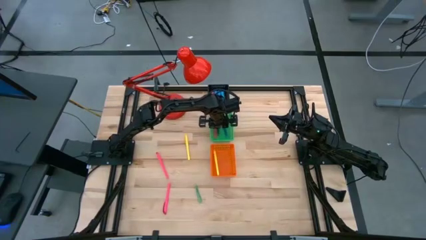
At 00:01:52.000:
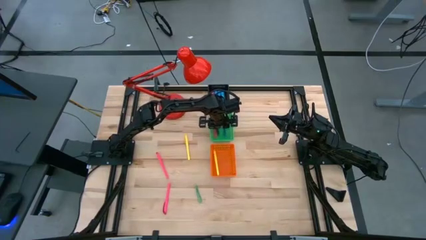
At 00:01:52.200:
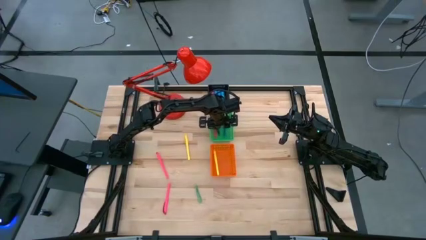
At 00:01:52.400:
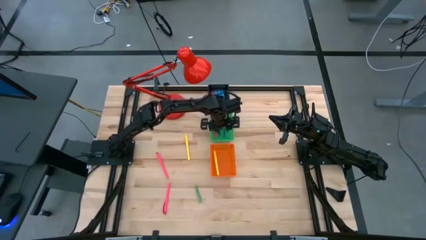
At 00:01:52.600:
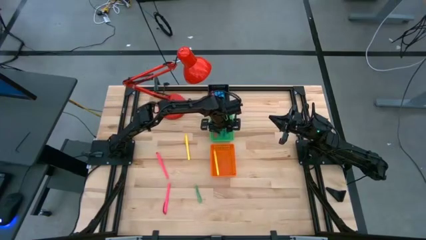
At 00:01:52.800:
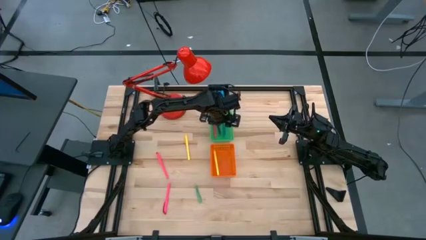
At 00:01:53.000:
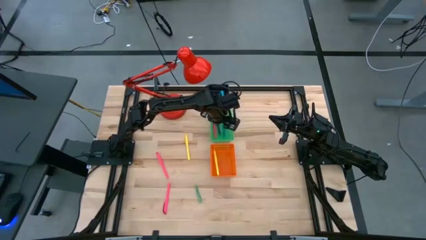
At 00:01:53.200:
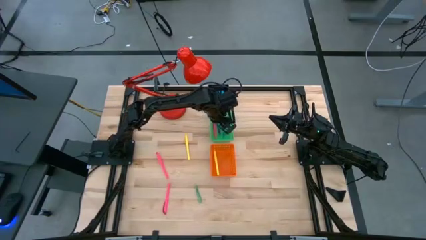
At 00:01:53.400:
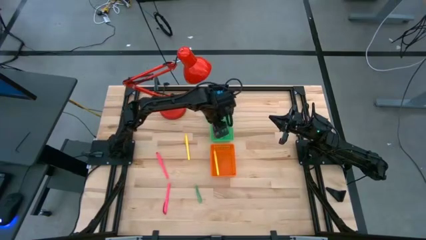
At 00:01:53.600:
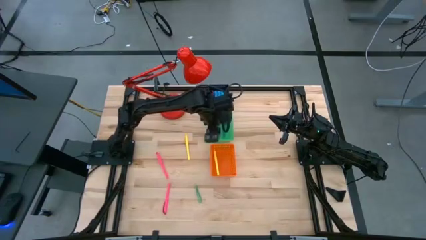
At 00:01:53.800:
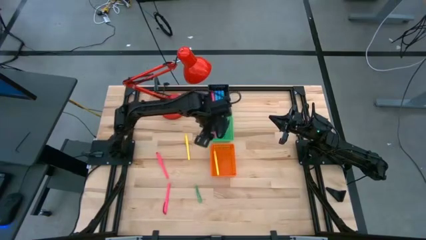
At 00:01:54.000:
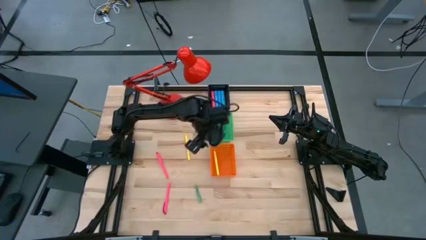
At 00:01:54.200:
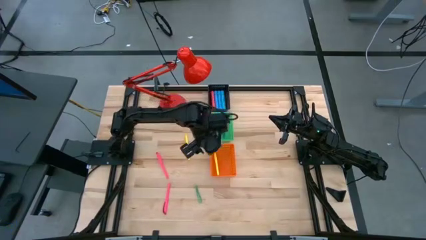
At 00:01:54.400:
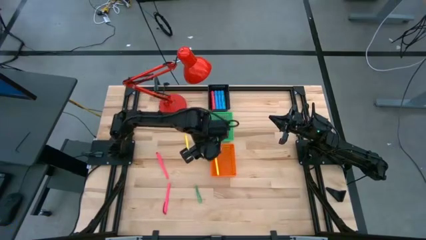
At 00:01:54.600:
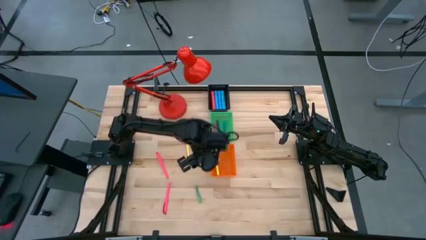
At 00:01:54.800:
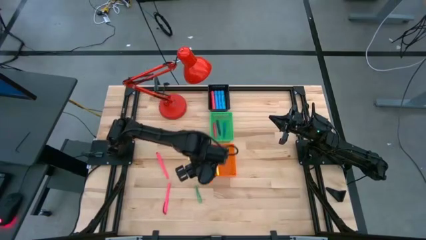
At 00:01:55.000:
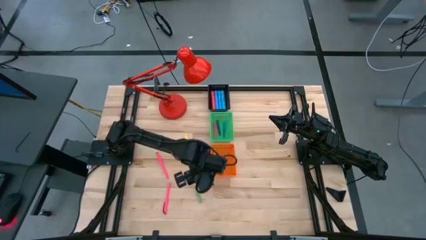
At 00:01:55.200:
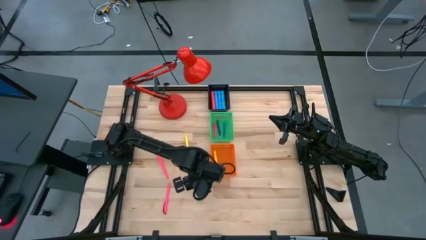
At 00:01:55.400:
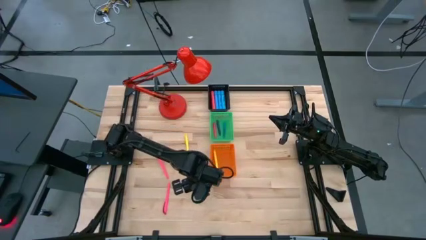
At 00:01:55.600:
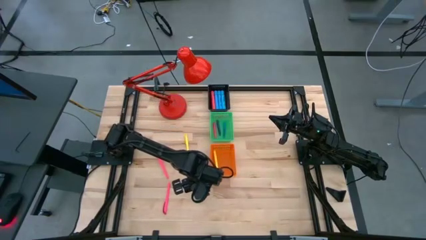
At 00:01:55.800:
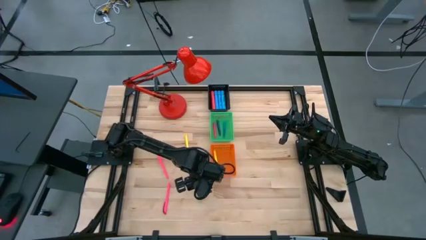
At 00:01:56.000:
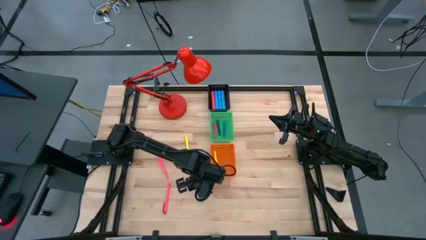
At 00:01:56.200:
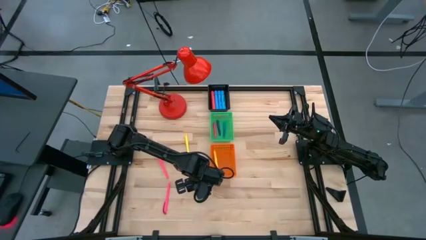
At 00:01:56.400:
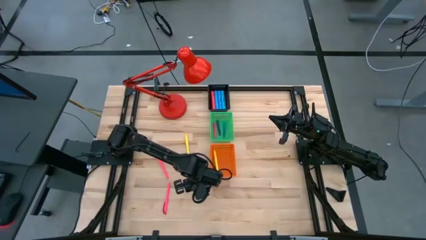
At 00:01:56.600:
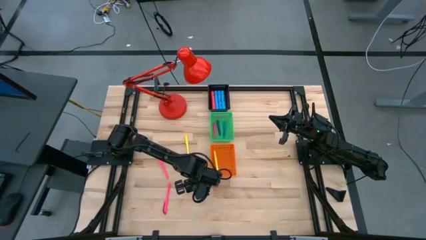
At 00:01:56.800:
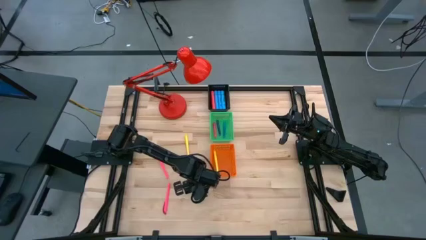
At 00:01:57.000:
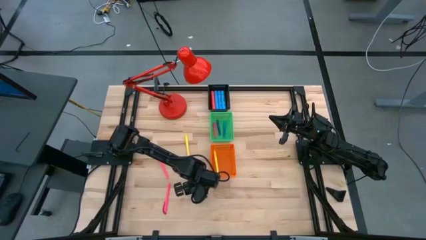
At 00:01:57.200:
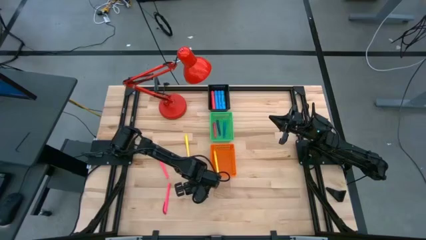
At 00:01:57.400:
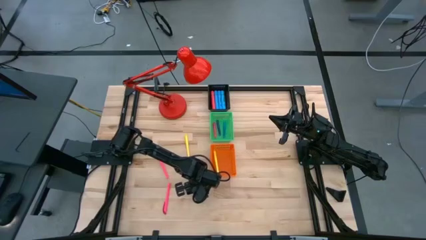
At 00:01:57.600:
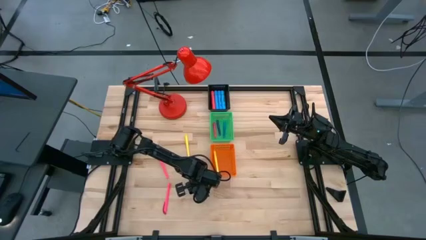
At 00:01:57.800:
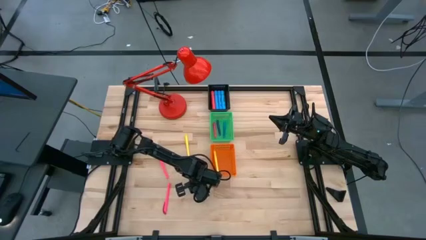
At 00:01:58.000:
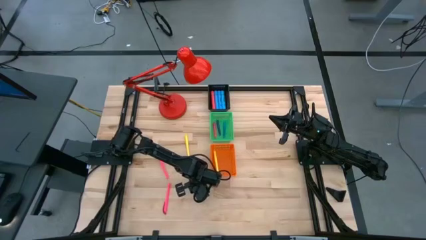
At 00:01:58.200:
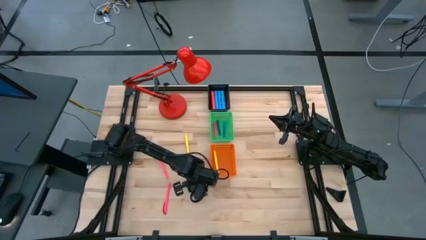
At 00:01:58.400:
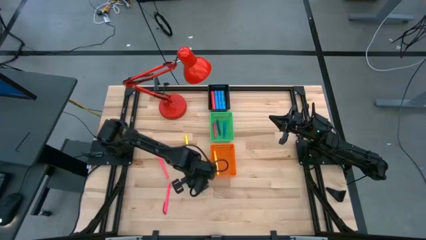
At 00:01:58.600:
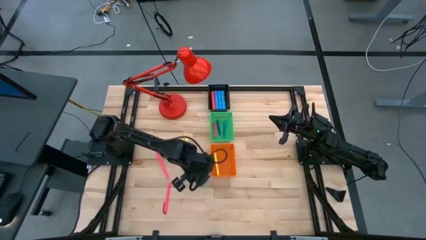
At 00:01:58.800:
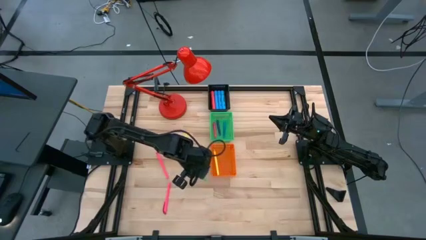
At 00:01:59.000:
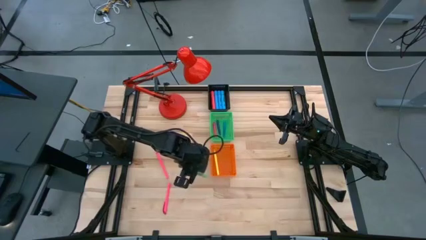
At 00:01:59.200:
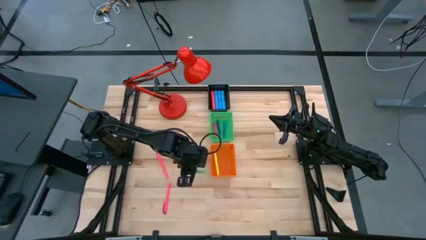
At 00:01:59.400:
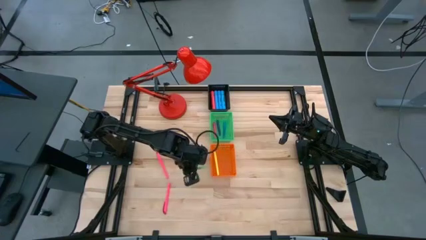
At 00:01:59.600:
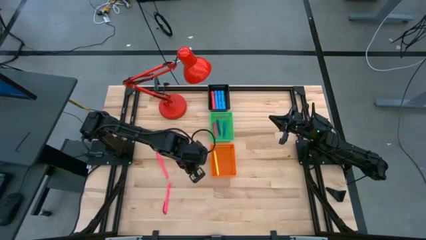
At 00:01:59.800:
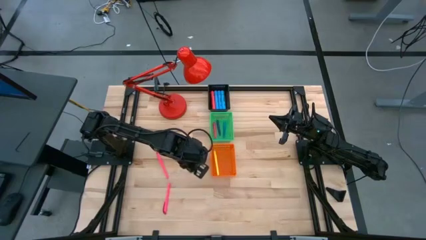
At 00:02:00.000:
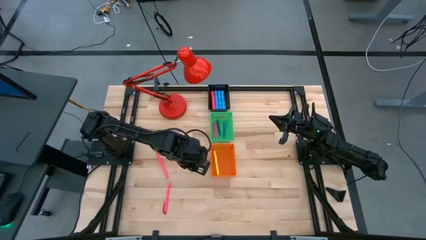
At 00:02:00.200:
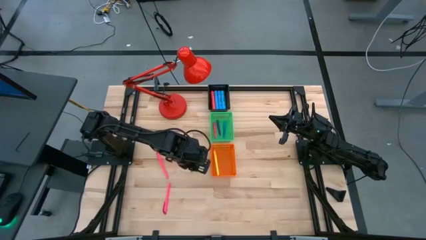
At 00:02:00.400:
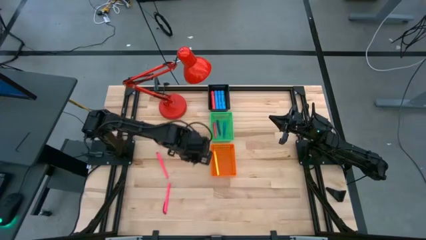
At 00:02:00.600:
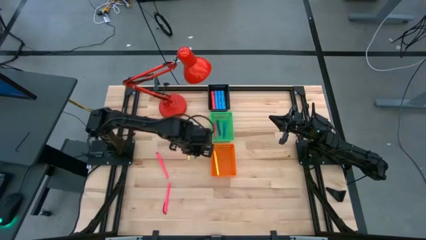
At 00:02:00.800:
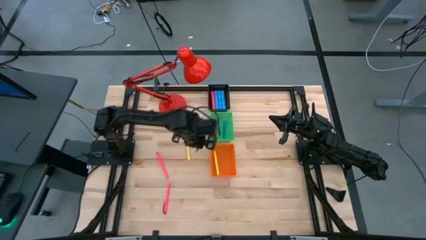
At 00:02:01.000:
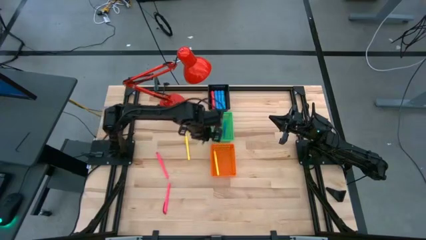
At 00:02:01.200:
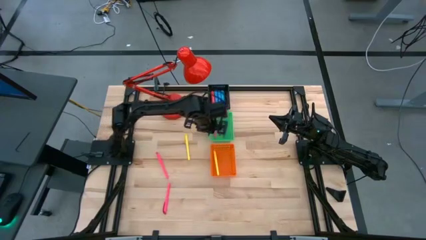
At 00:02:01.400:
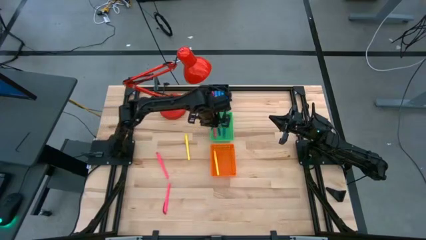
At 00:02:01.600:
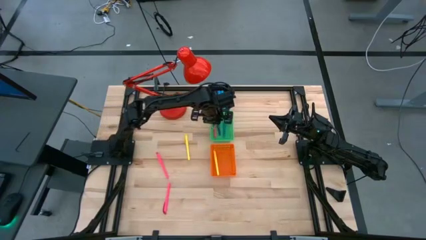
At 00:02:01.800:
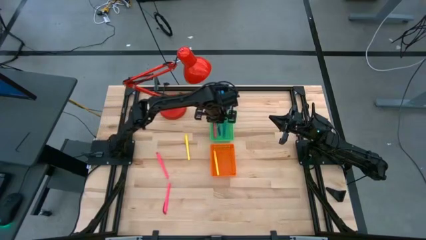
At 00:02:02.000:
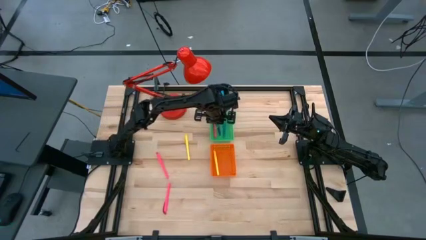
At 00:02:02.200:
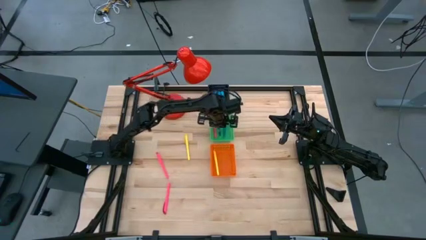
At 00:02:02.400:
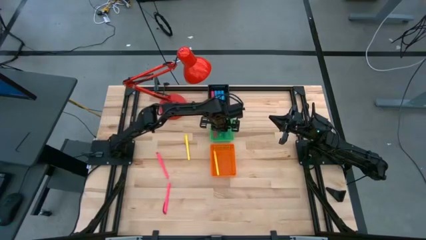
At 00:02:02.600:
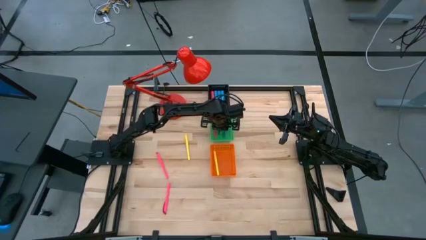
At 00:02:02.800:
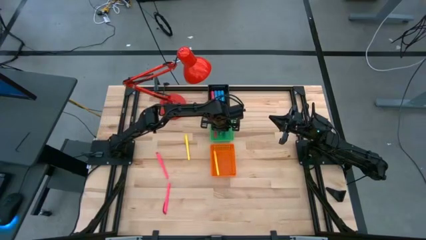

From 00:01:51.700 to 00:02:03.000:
Task: Pick & Place Markers
Put the green marker into the green bin

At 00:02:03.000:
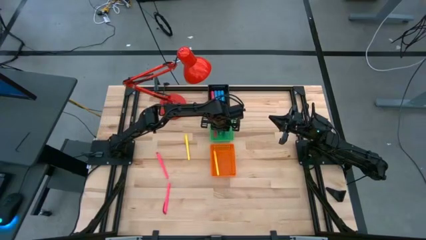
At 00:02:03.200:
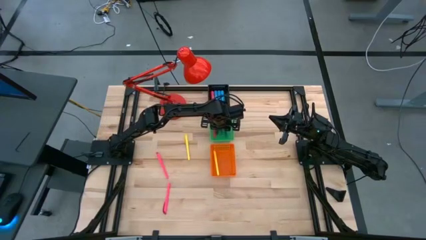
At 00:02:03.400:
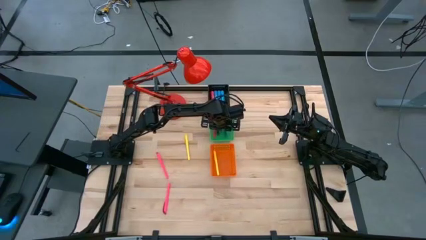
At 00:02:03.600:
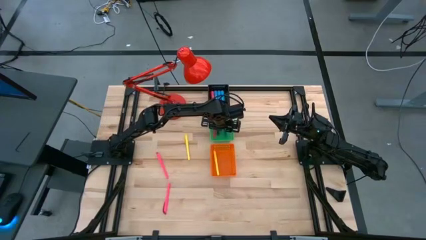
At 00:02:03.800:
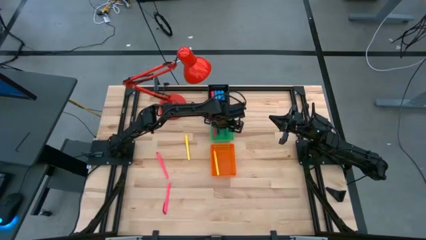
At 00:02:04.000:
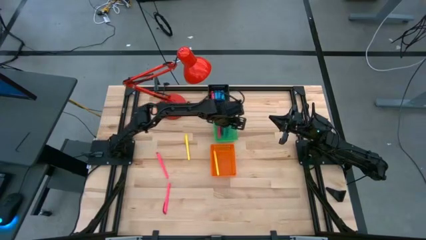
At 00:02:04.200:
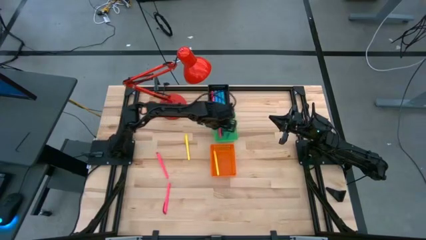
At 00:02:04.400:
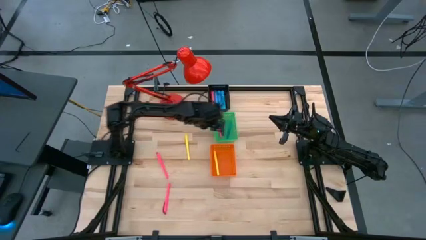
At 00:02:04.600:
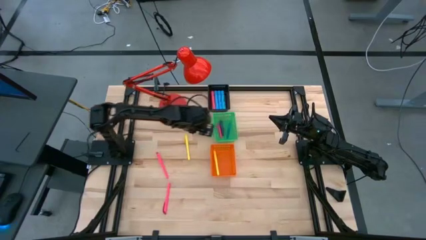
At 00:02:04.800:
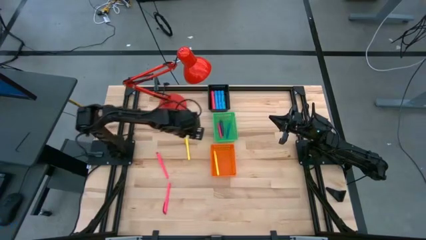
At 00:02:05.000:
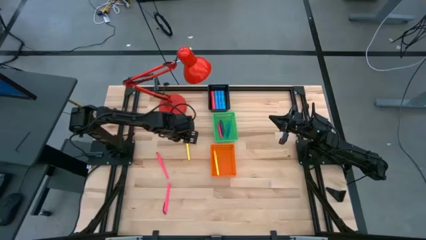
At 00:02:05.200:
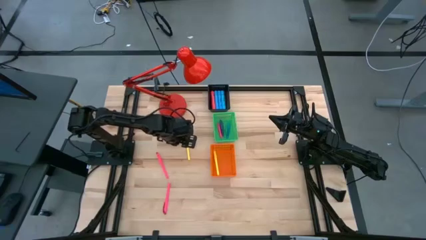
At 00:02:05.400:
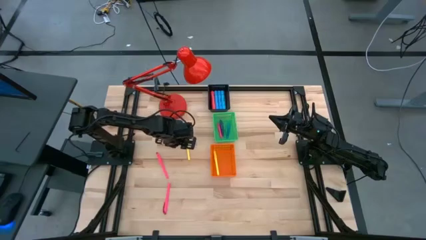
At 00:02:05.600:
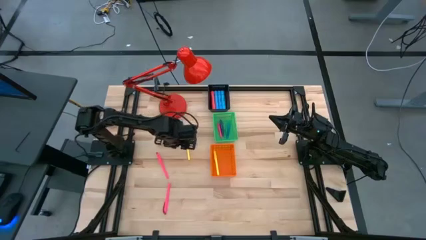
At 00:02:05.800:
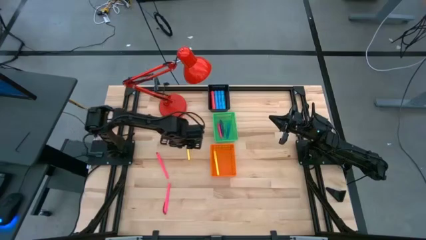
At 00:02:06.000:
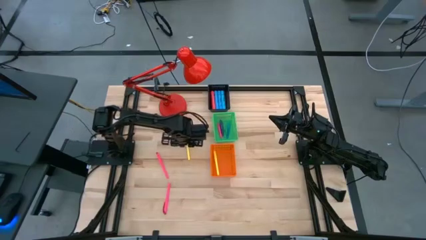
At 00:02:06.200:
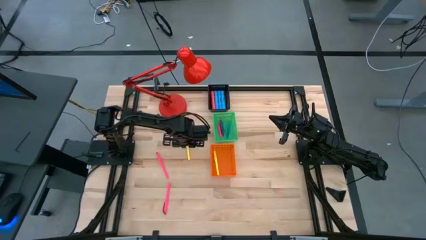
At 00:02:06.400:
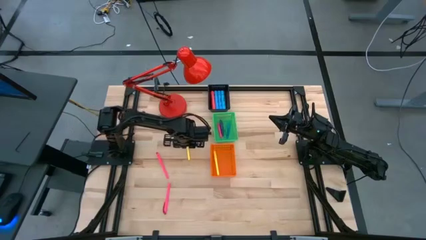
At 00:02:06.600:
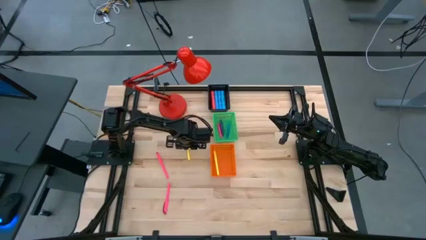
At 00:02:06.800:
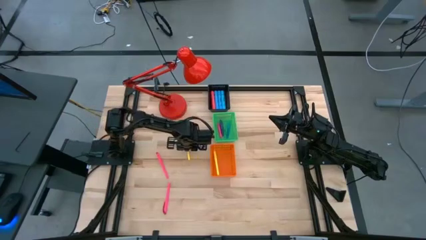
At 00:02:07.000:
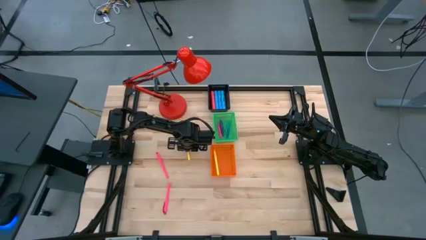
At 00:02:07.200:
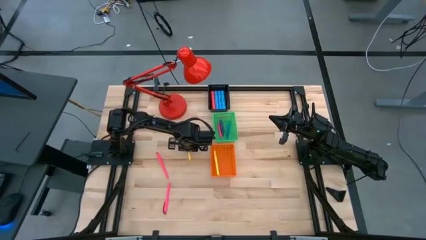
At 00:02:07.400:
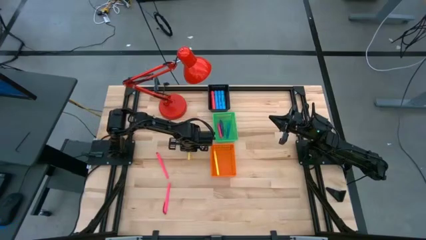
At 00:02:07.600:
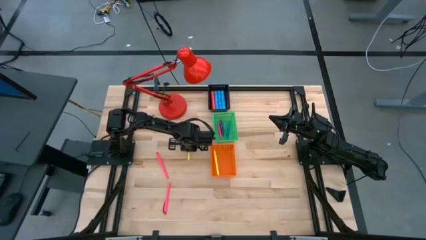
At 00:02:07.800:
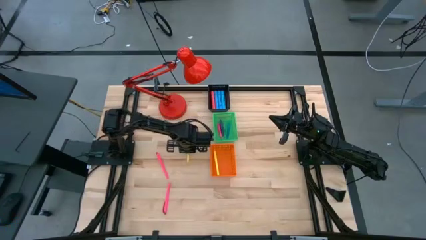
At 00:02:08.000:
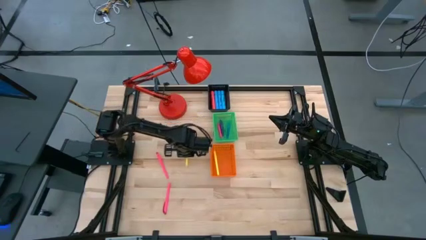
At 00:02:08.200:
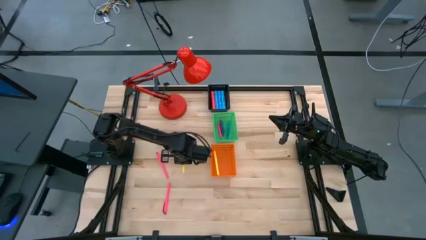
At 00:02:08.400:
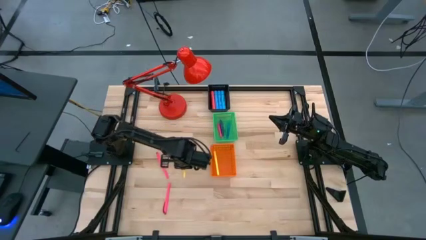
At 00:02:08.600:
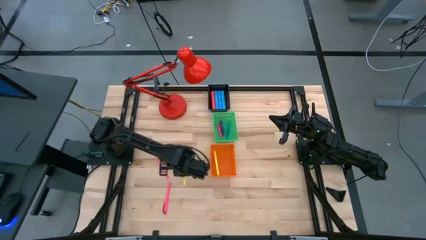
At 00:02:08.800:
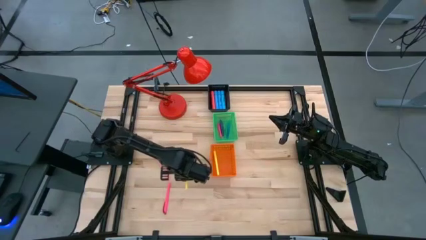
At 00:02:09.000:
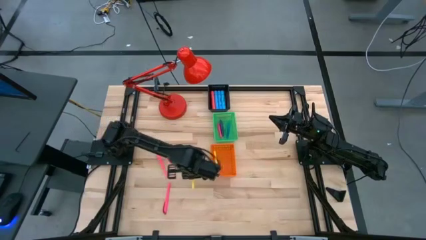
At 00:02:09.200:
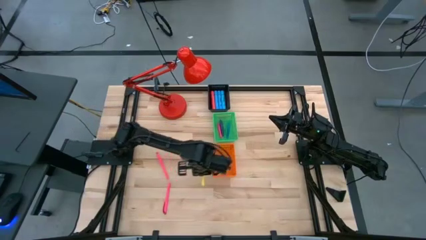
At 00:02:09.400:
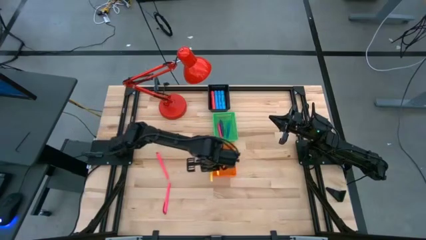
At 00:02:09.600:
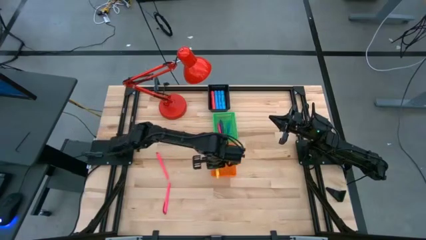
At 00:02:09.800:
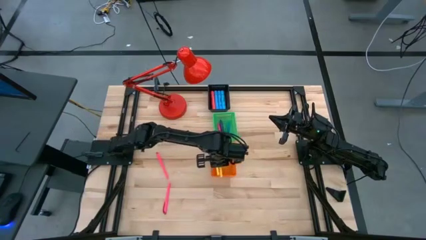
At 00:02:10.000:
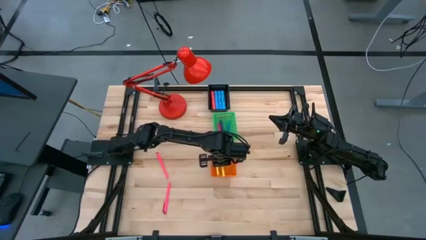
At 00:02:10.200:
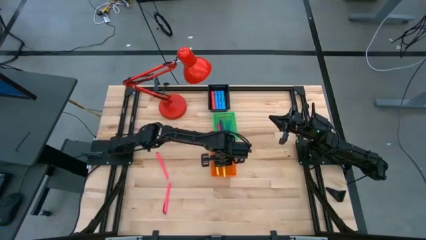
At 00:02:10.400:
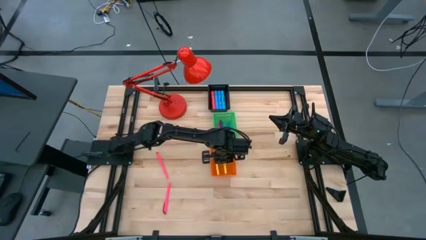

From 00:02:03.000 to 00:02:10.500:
Put the yellow pen into the orange bin
